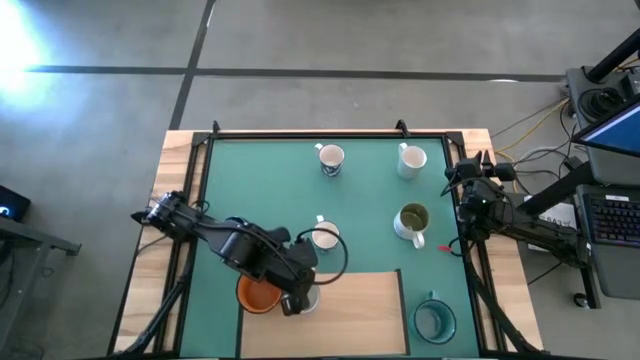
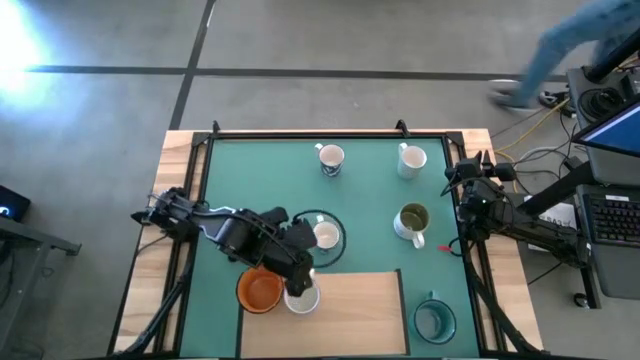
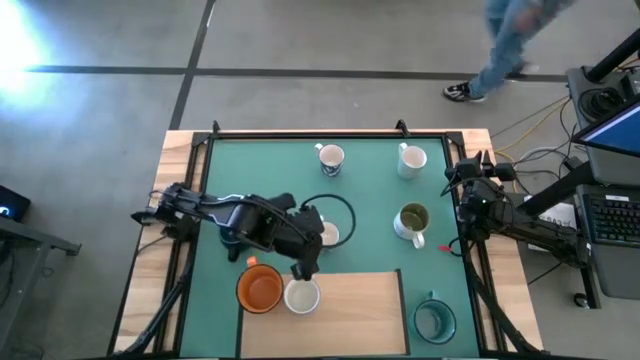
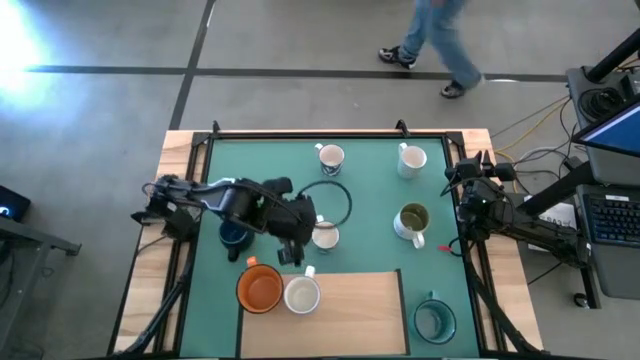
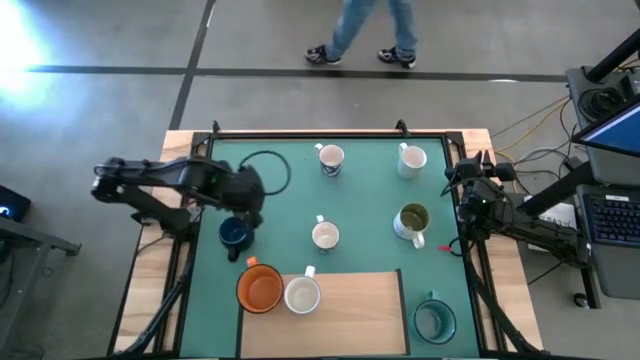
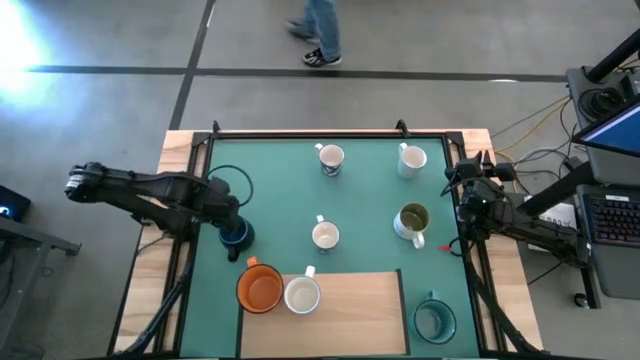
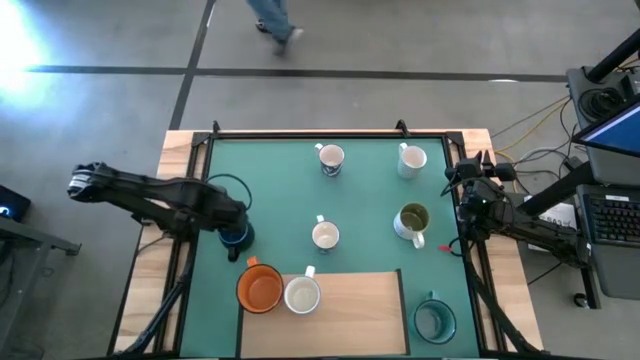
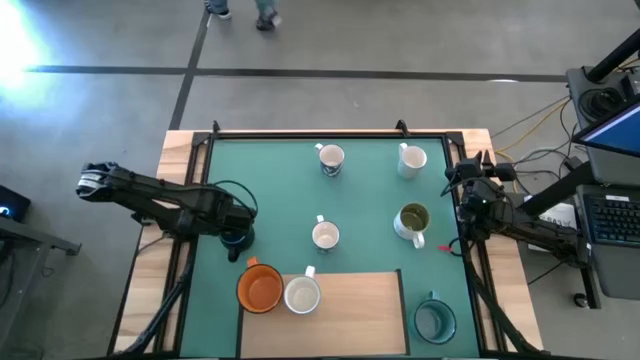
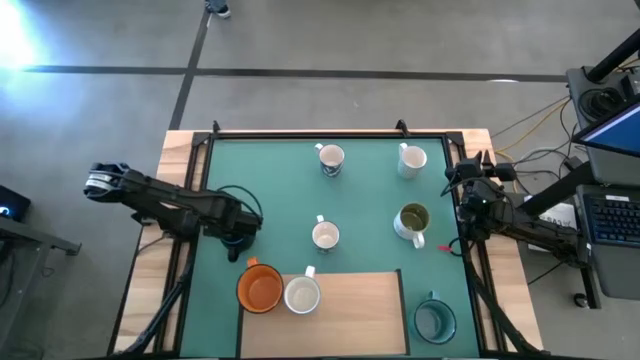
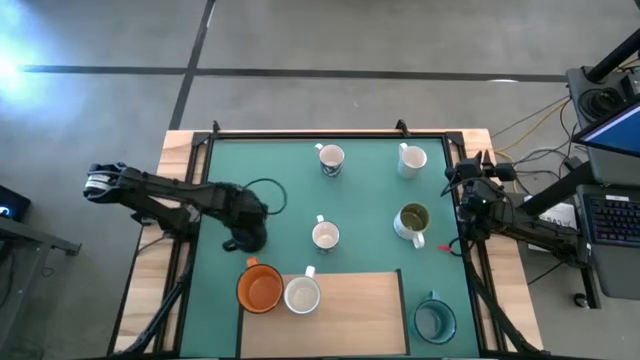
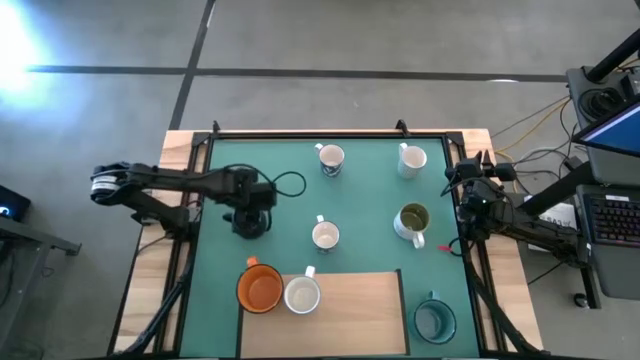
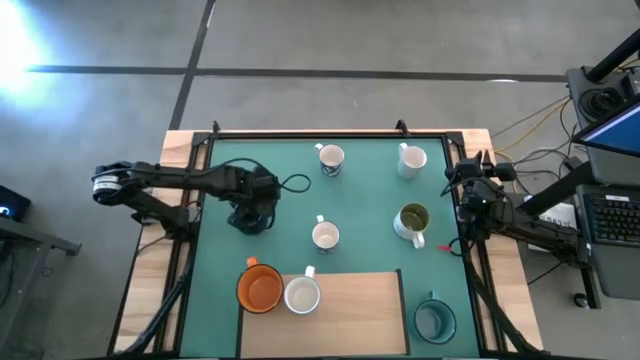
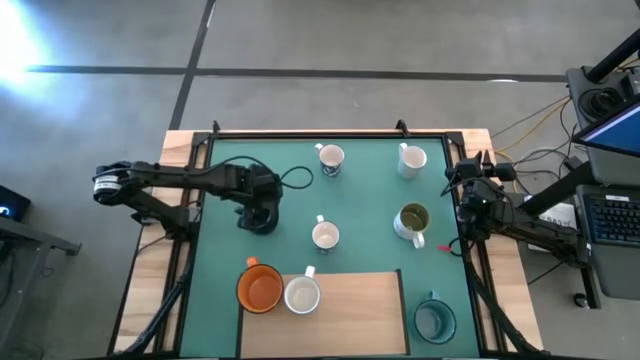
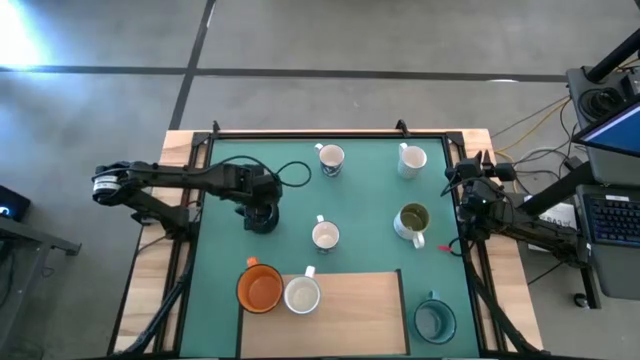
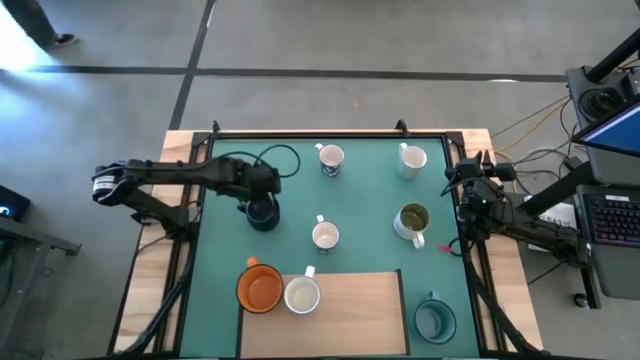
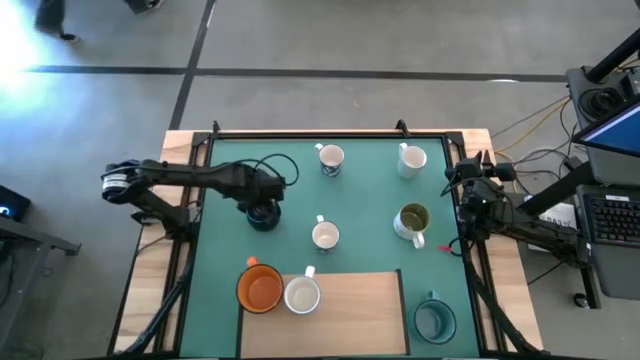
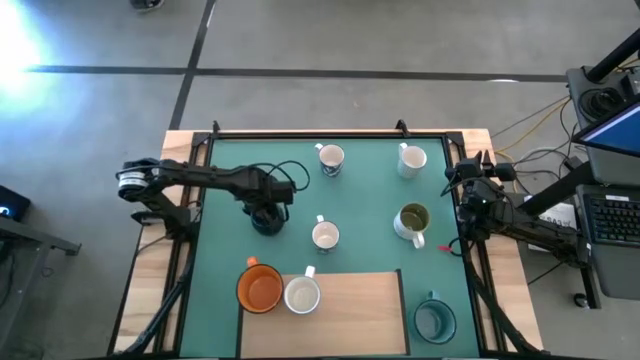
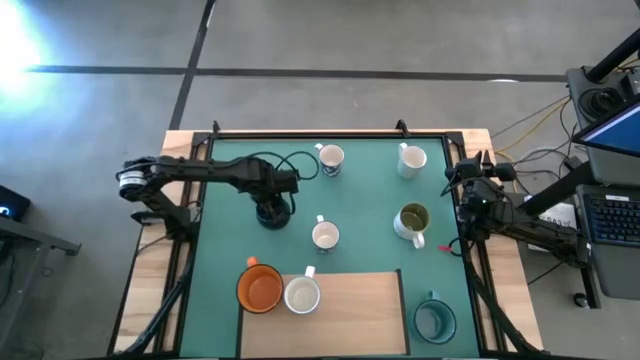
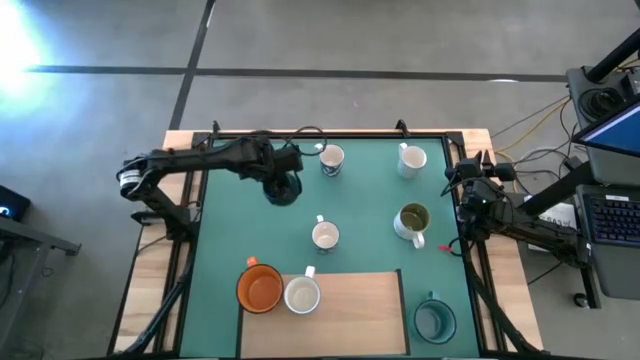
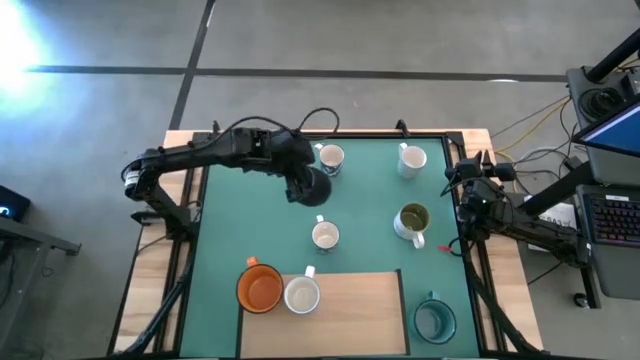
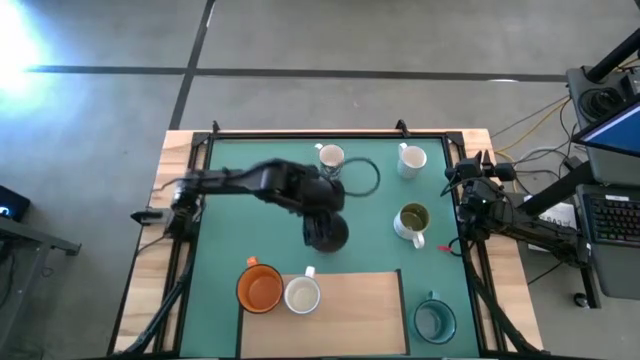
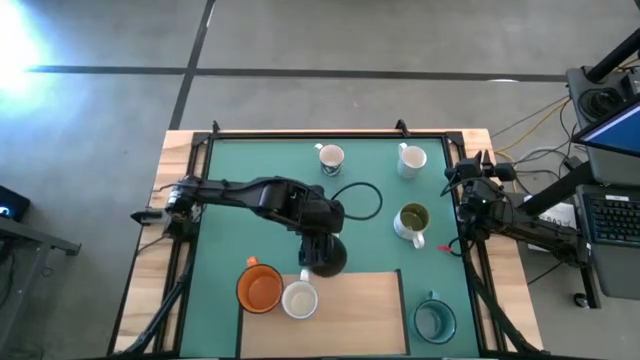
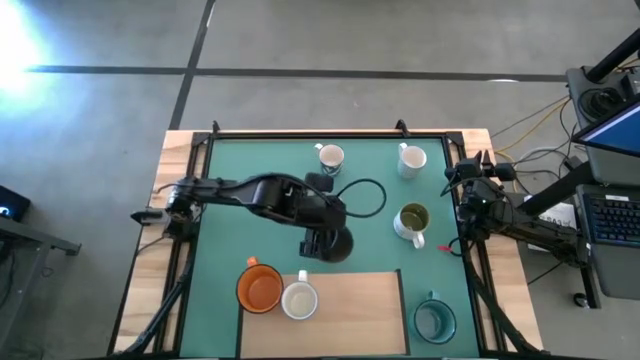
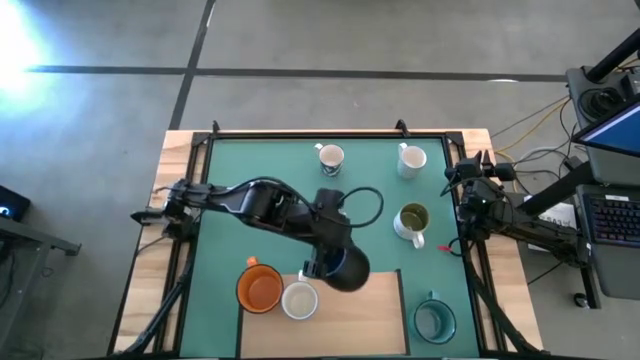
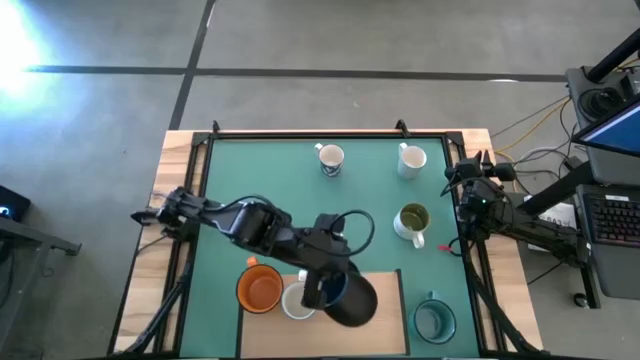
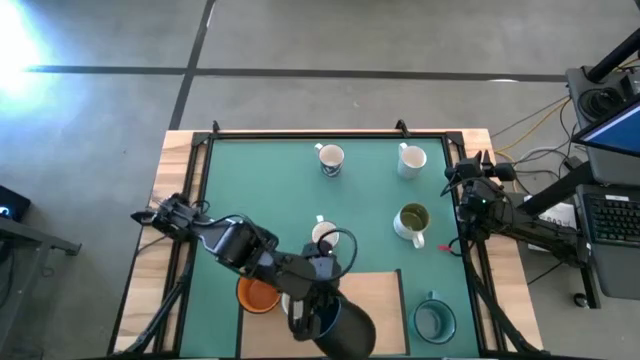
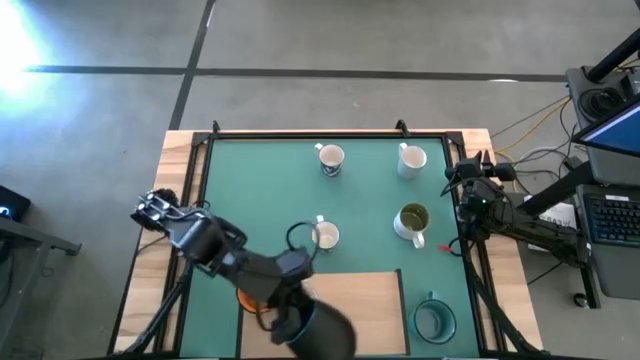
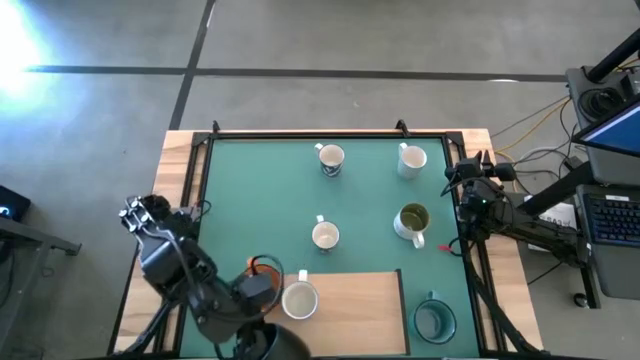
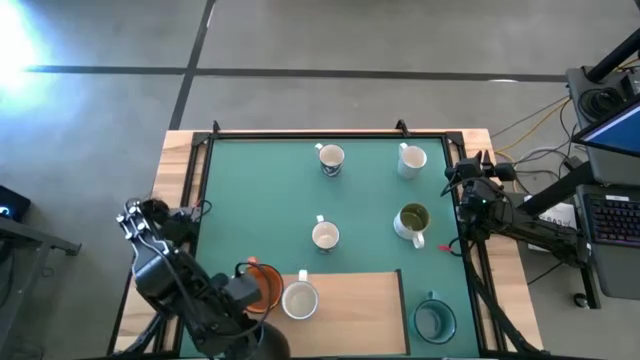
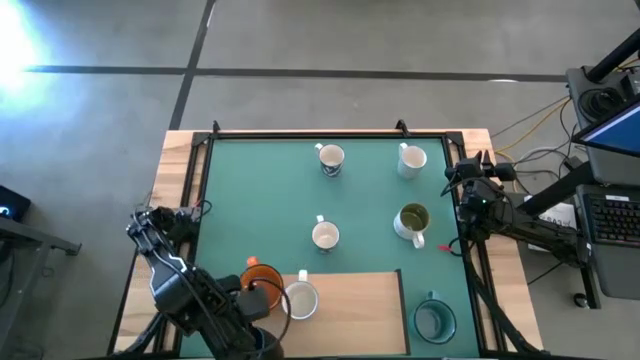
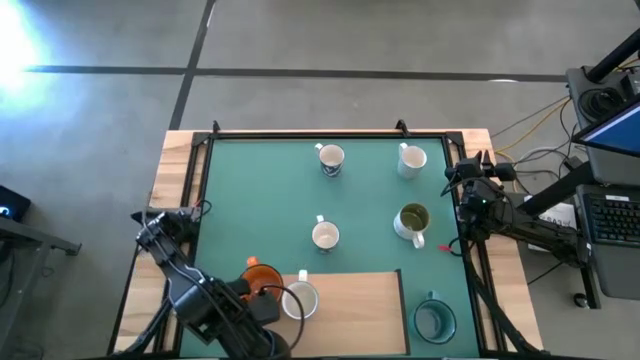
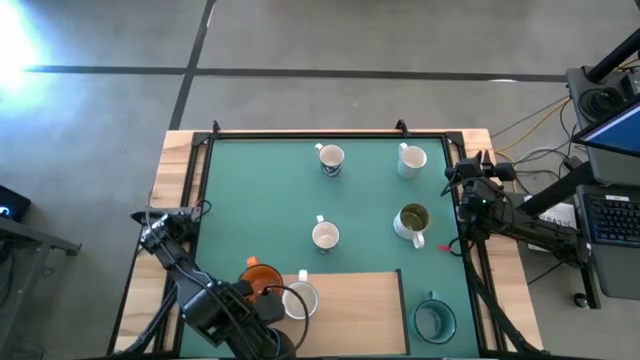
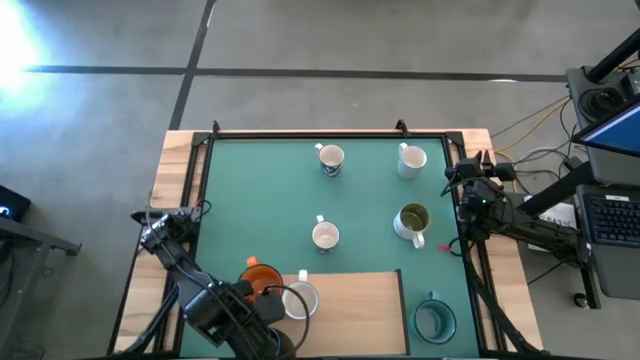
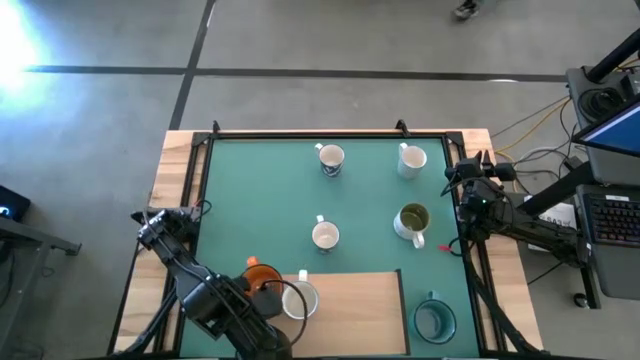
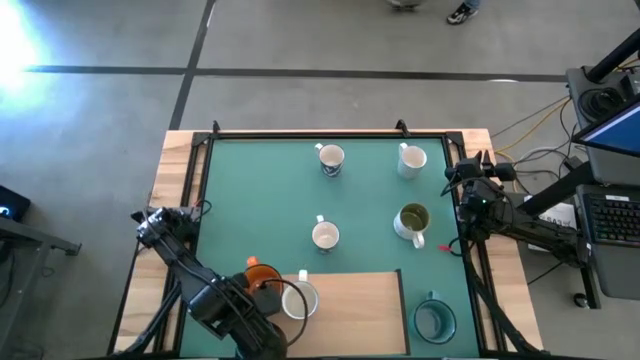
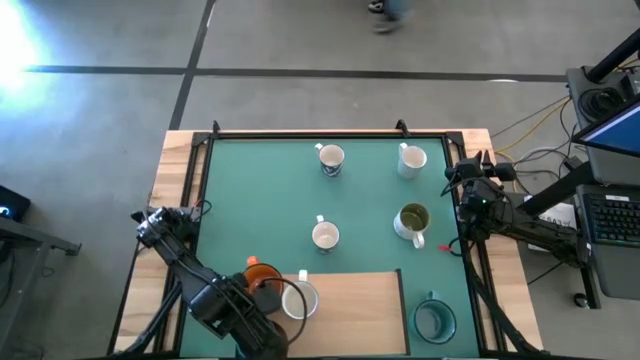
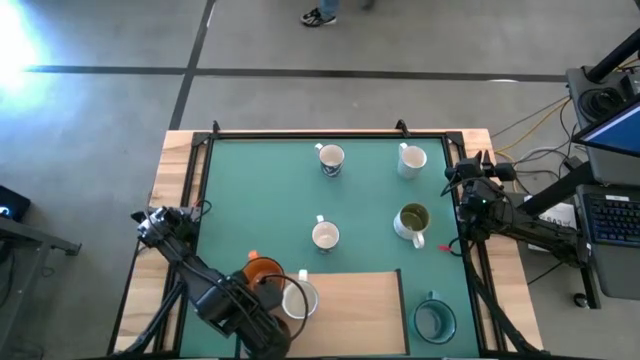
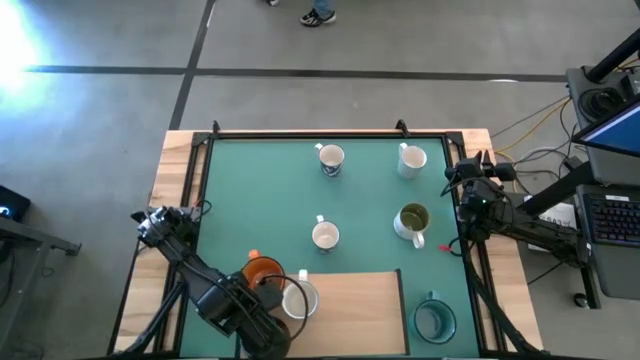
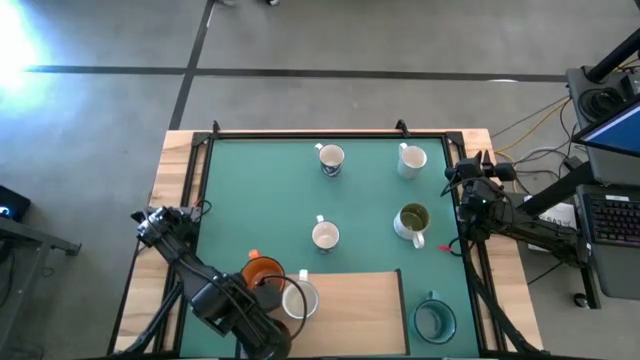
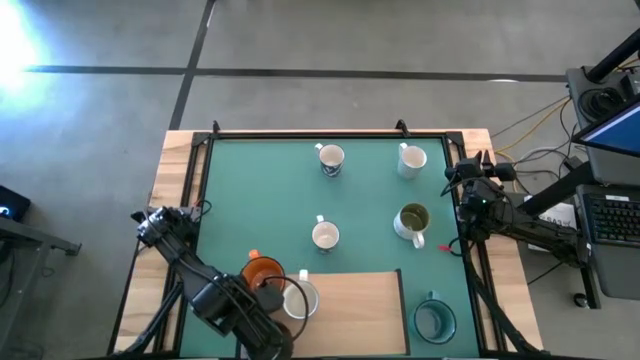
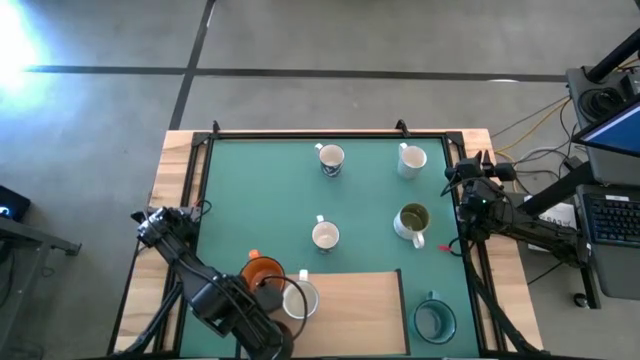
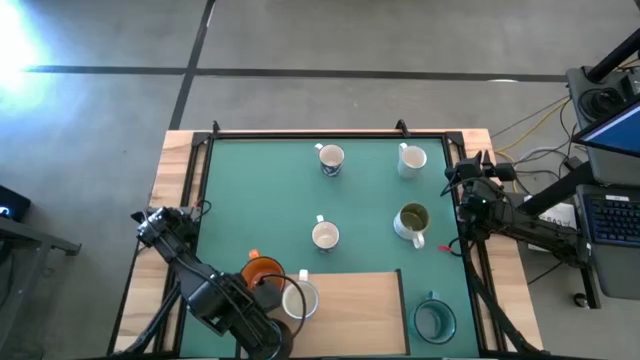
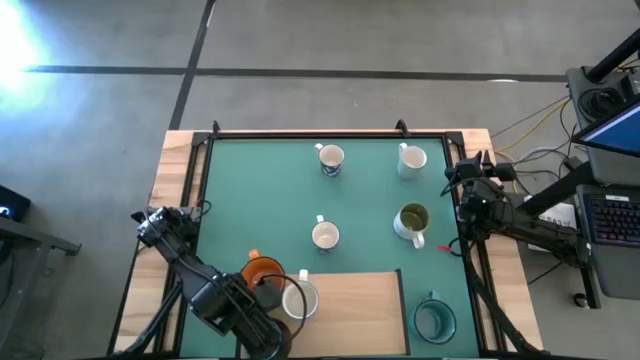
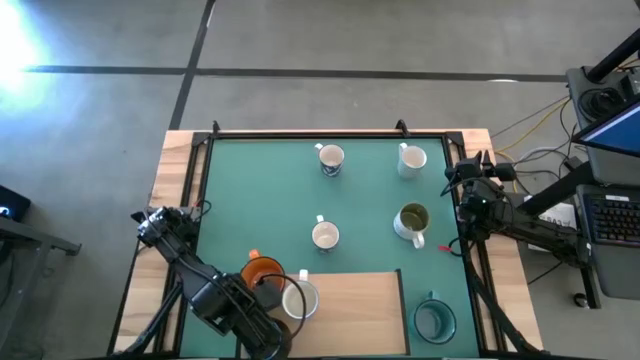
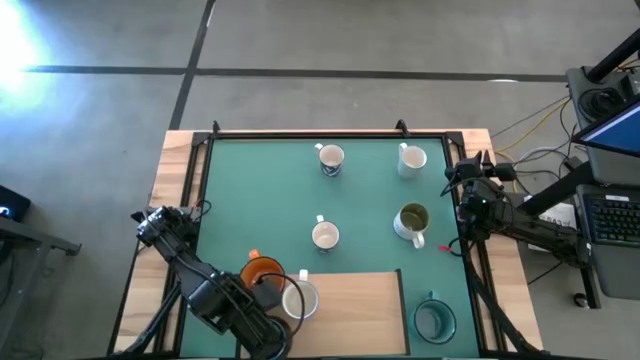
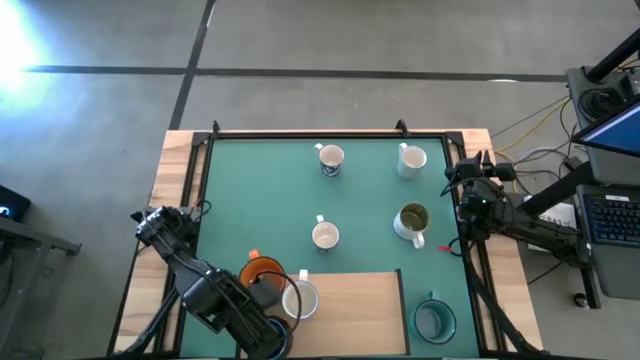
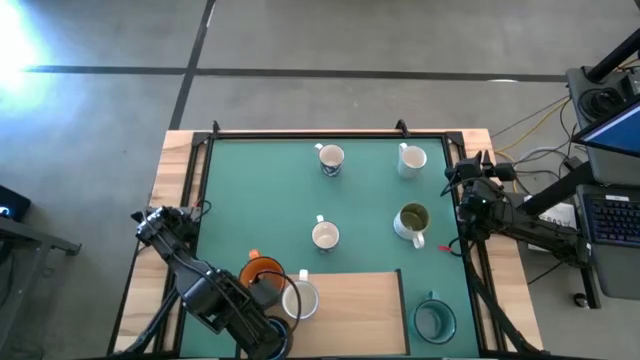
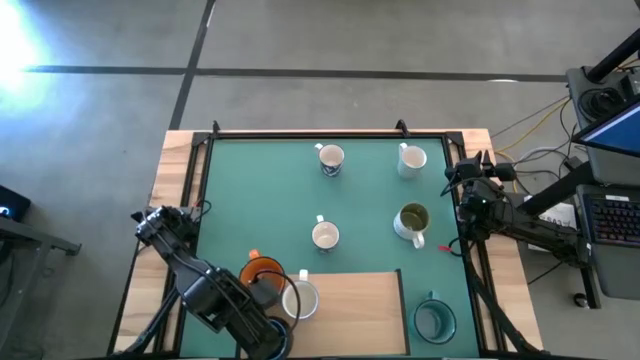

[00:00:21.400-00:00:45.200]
Task: Place coffee mugs
Put the black blue mug on the shelf
